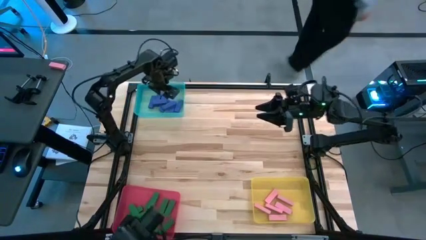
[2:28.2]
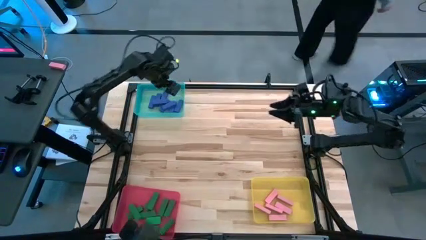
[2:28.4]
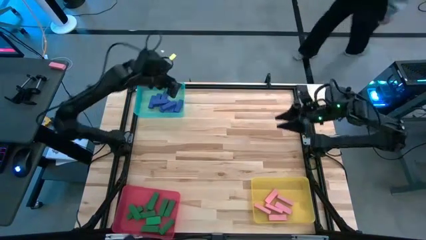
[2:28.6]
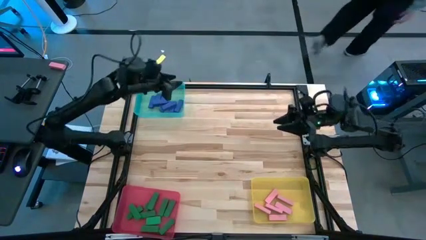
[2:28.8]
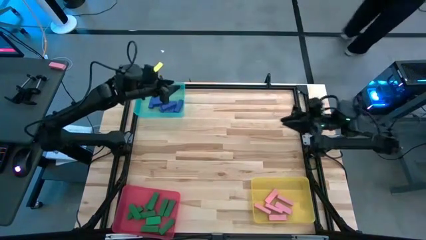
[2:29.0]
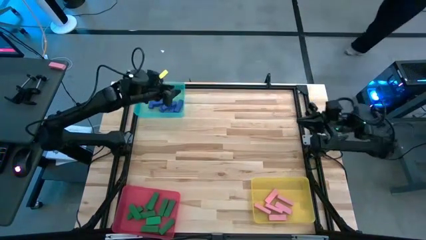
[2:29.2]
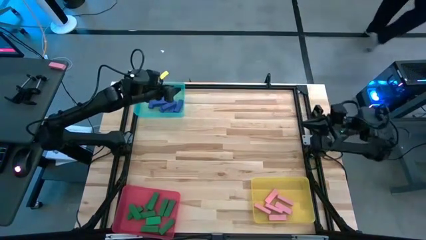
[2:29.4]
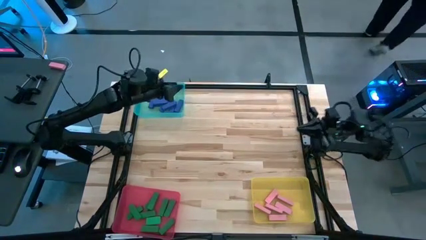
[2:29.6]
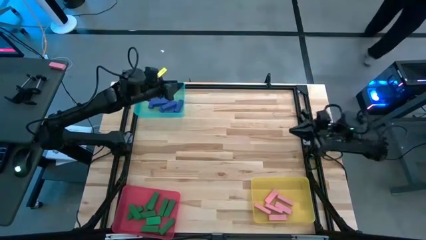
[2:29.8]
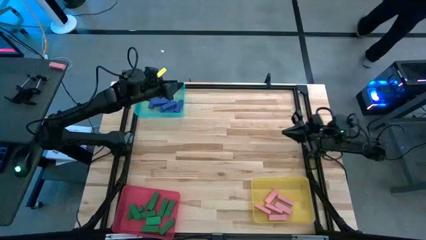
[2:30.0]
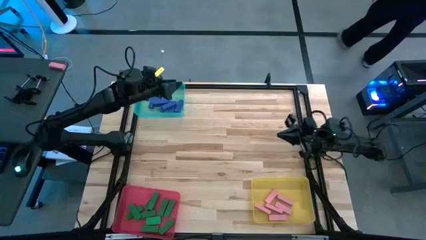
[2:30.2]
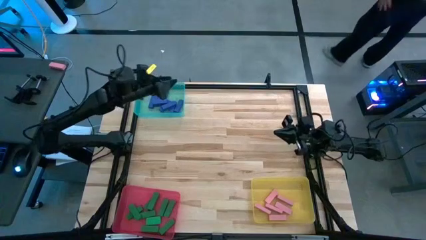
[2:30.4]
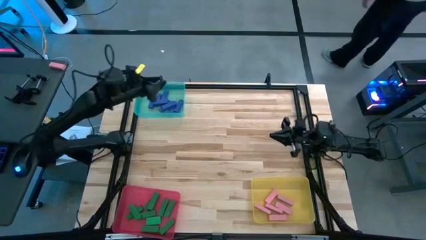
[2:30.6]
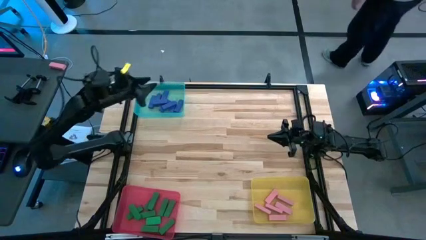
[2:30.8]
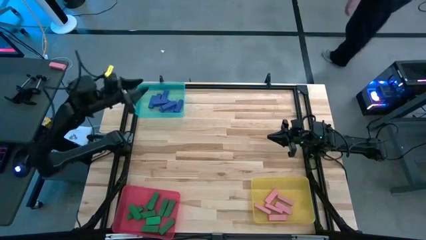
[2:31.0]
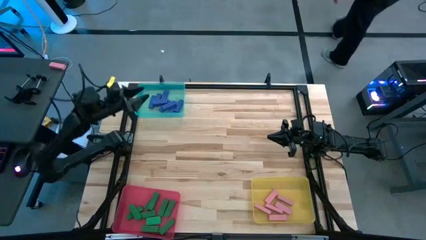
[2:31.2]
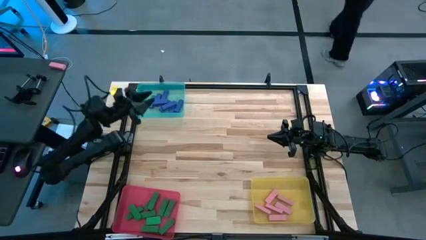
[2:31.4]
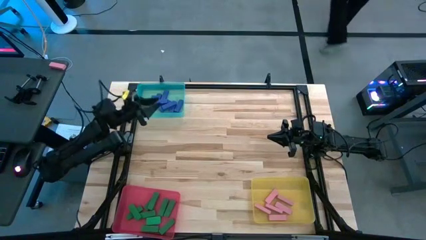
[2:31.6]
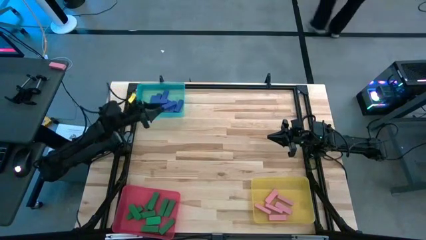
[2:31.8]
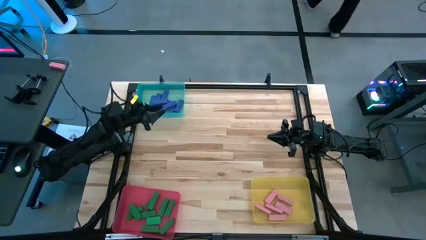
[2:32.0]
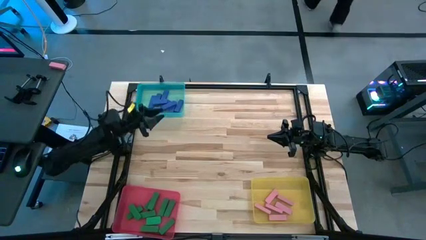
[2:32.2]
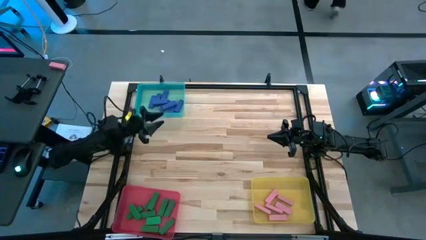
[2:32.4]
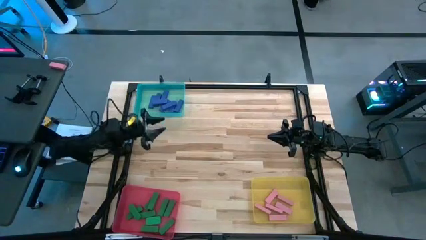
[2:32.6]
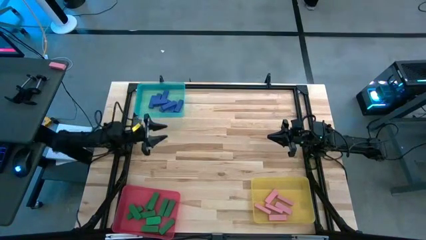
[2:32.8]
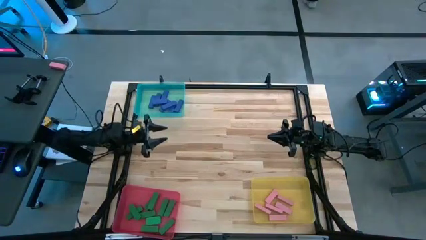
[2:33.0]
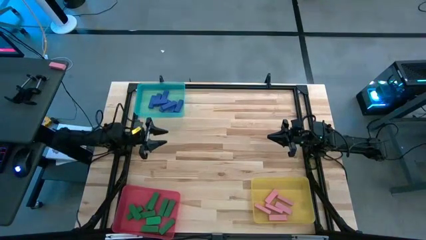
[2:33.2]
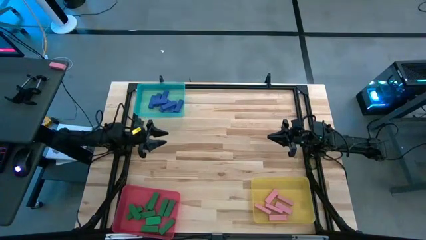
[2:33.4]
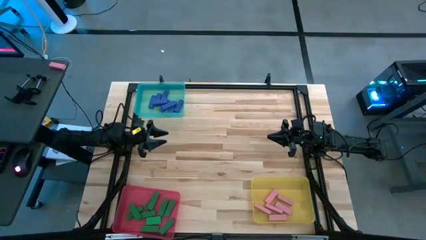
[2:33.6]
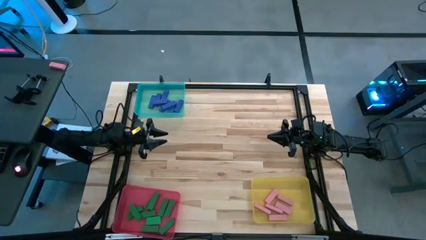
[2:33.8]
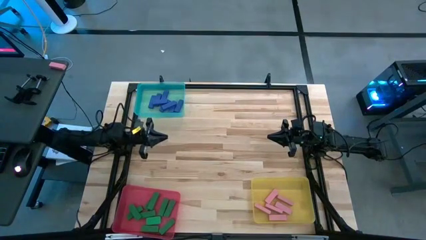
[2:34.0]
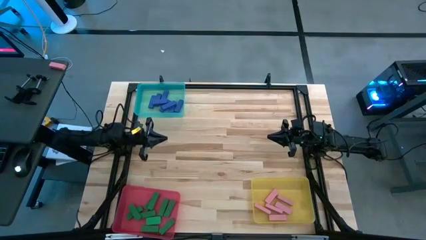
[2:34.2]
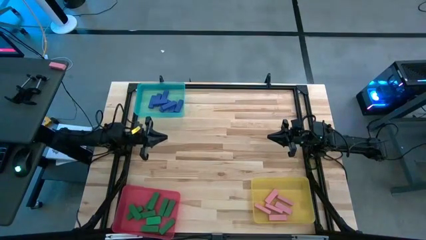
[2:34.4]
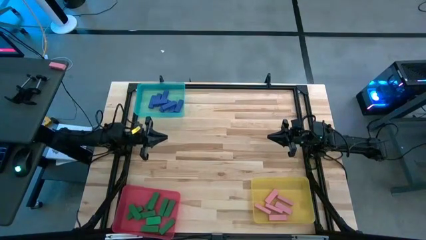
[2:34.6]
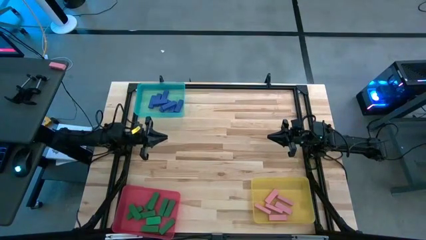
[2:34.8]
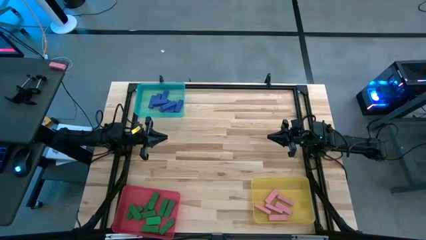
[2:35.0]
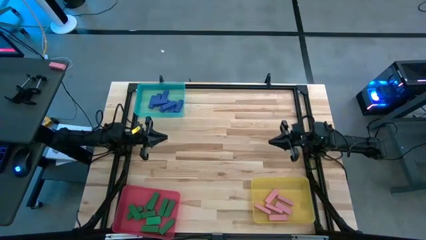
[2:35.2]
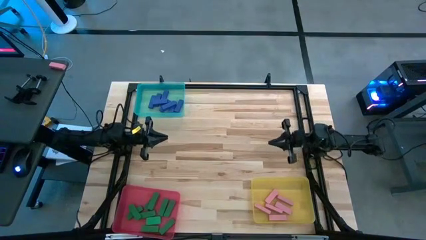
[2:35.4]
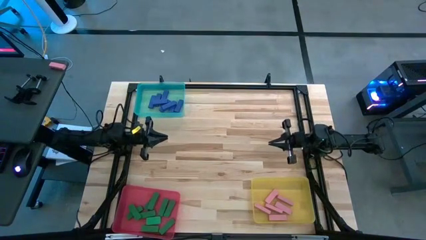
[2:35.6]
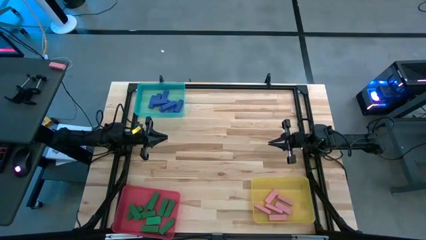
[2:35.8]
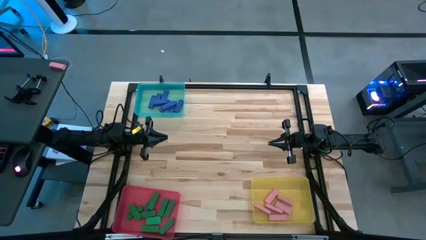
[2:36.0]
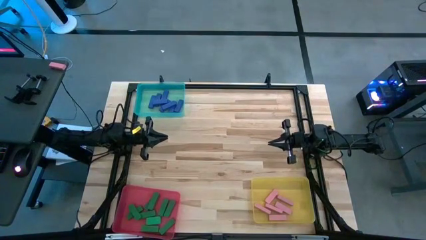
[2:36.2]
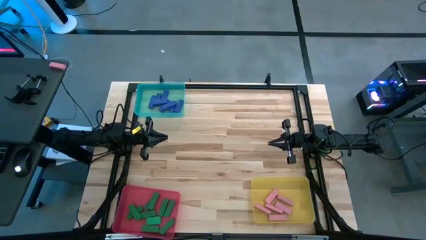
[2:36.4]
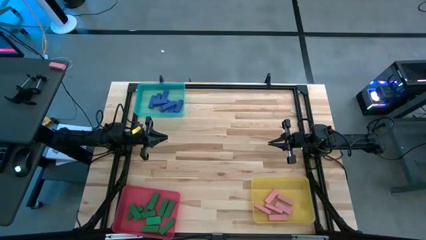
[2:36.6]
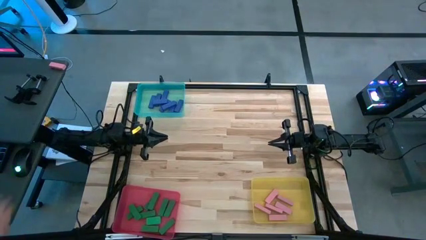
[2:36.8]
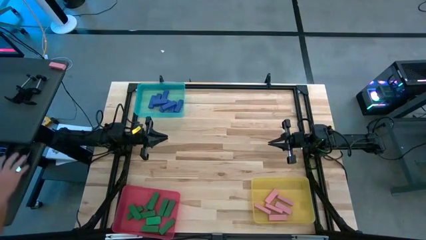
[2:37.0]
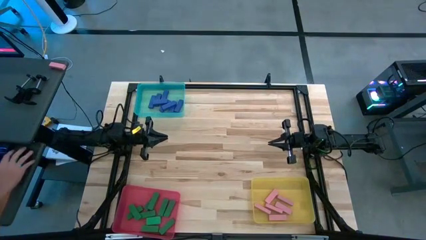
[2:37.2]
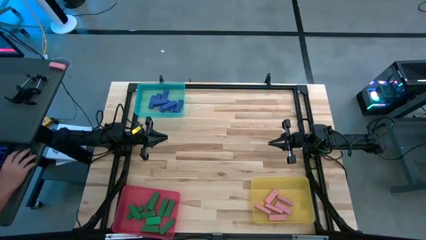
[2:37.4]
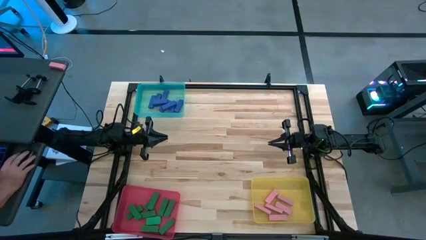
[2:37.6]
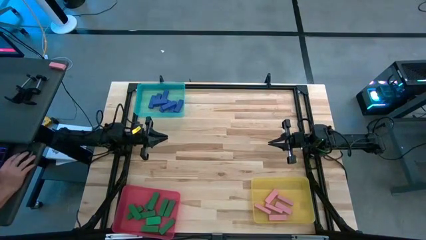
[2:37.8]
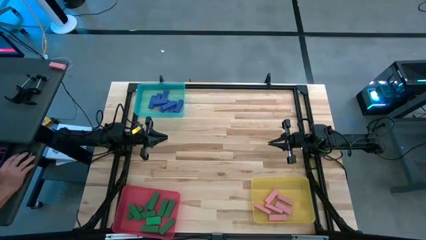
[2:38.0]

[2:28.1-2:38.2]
Task: Sort blocks
Return to Home Position

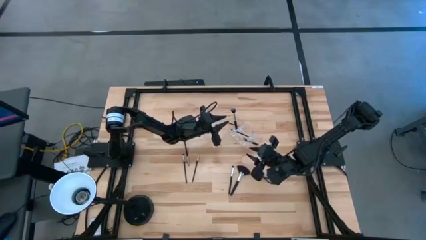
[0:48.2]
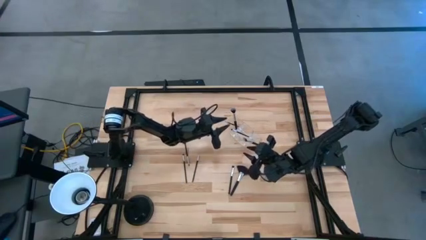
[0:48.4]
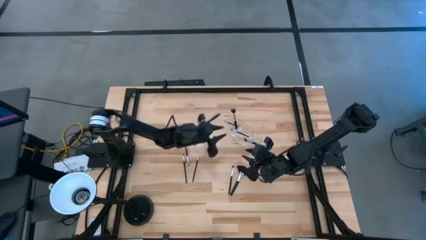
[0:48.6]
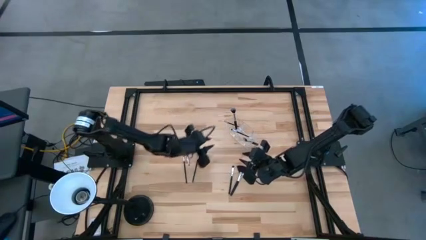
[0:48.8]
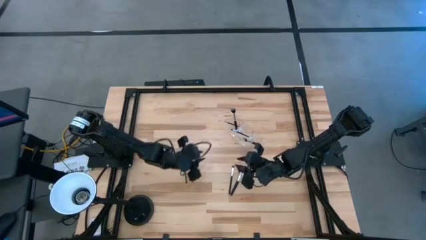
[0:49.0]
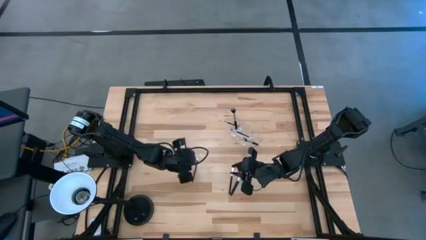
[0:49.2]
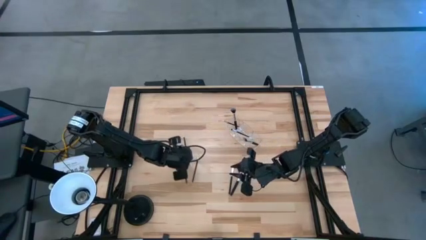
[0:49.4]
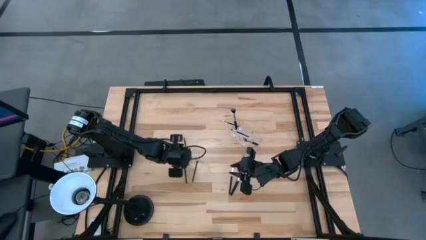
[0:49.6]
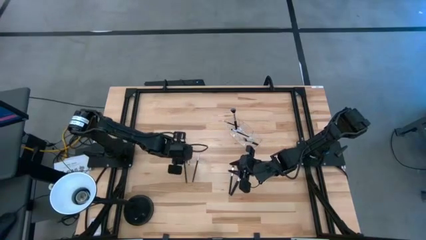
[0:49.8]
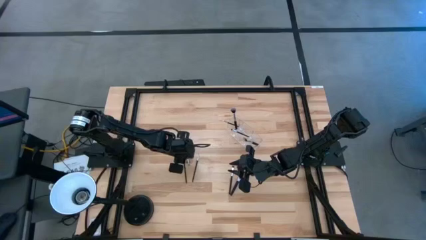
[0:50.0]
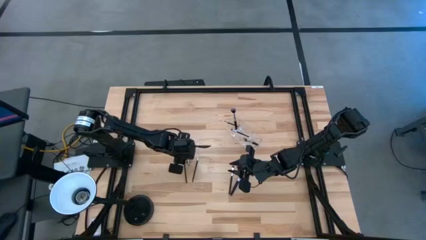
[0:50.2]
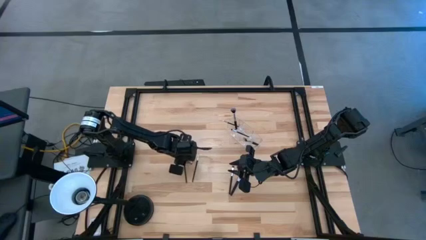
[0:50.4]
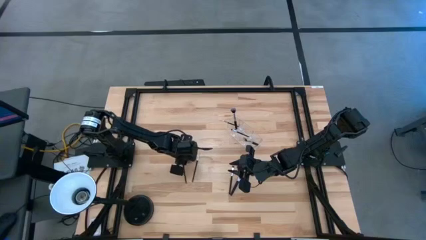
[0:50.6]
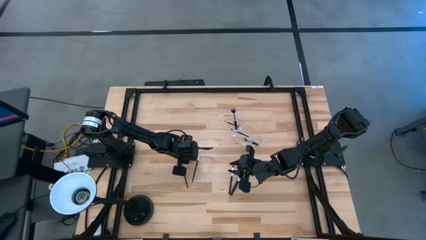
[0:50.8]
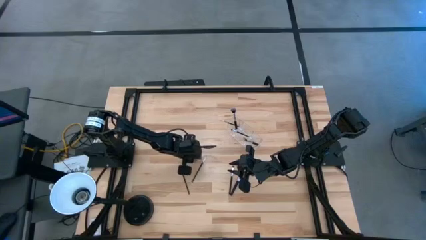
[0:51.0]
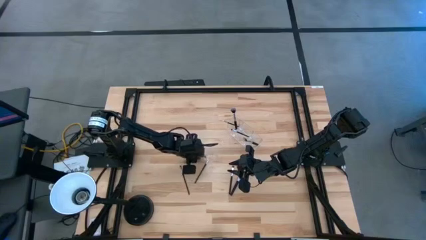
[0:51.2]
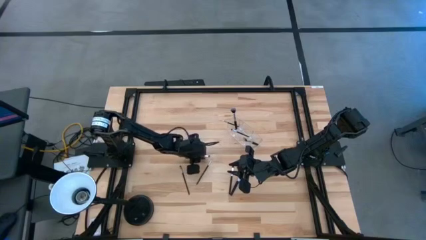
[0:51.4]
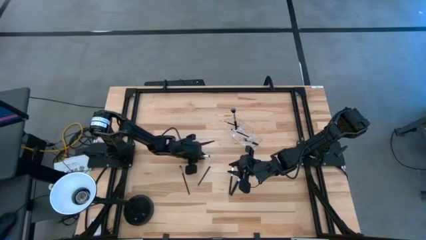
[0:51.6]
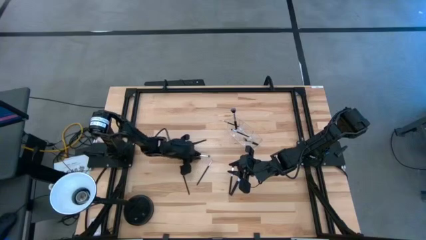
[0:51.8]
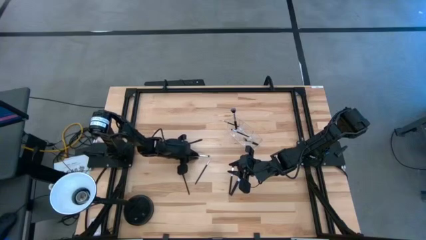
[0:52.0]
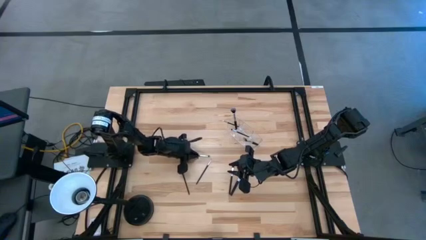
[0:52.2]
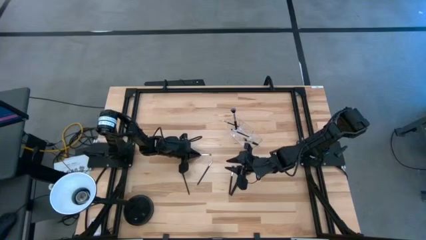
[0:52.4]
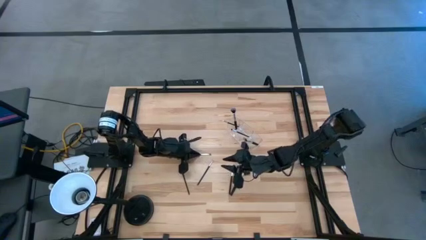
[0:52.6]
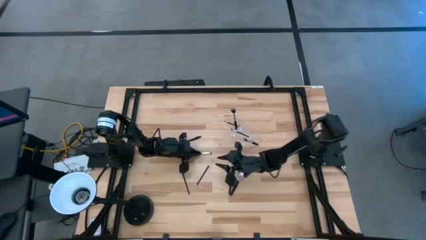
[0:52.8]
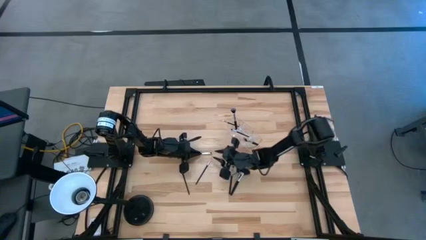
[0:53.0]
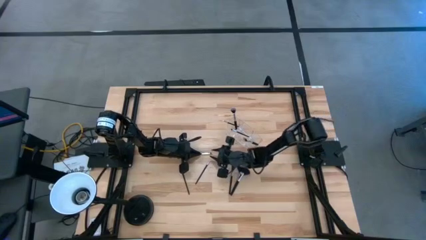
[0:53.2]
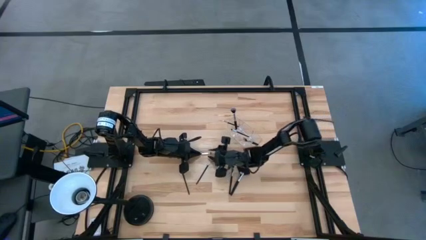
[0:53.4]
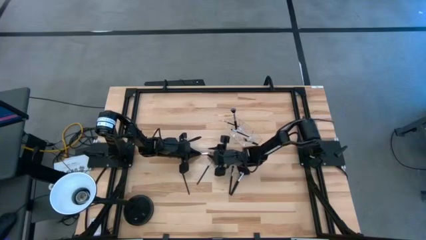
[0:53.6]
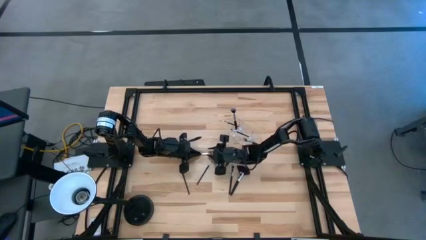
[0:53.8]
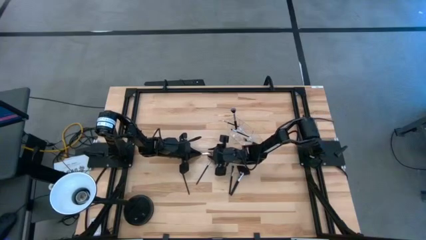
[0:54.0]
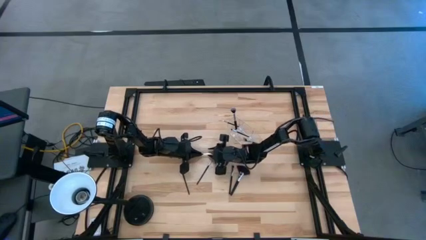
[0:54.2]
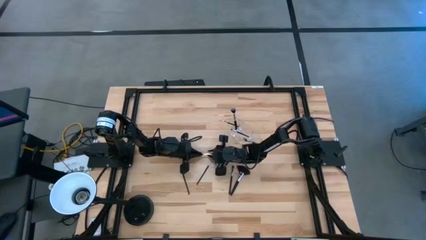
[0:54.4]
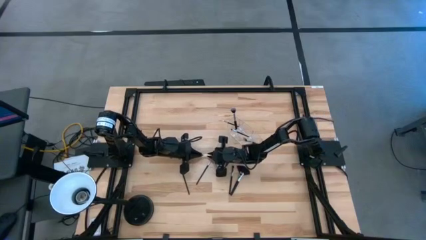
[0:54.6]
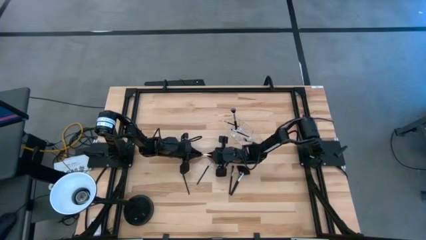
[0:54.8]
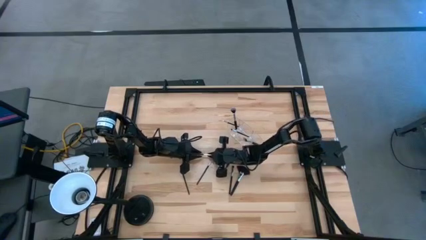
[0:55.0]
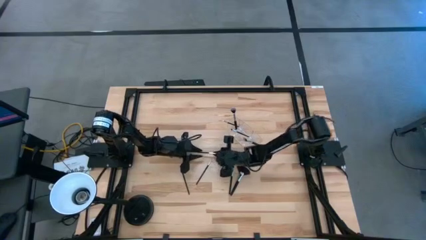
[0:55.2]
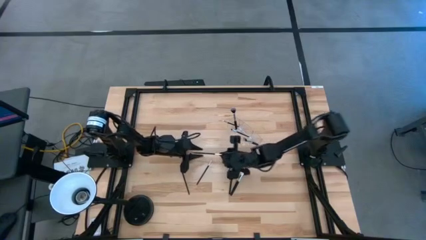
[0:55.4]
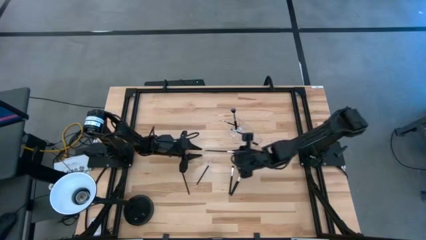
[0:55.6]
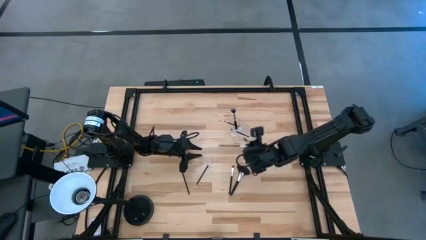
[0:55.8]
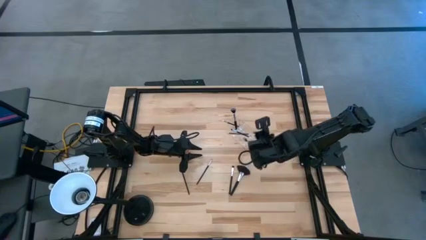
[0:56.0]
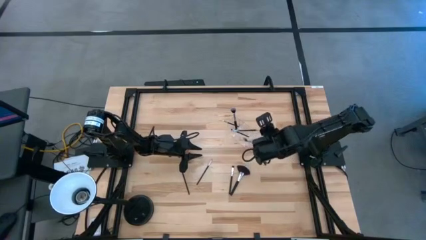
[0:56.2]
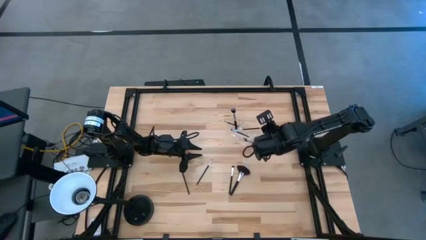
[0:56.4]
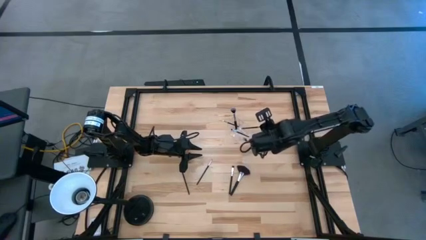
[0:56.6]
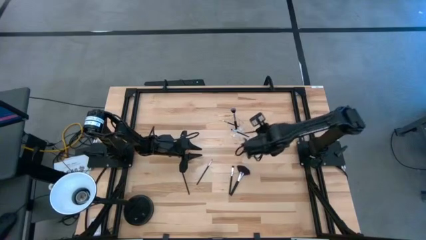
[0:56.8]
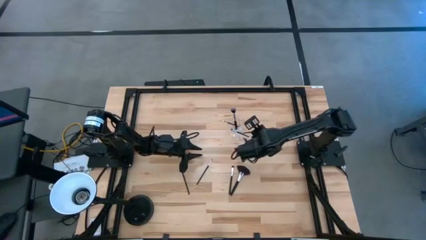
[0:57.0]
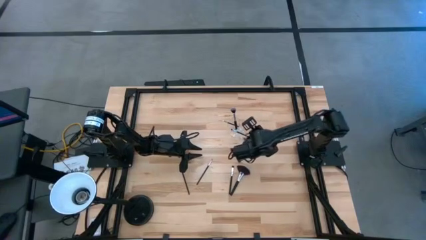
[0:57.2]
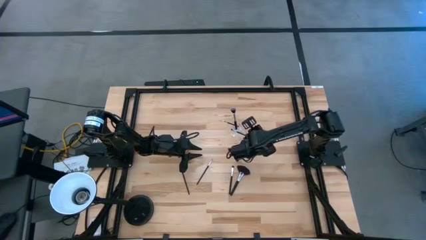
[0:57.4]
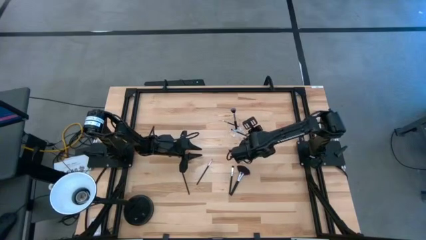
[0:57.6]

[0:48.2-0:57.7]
Task: Put items in baskets/containers
Put the eyeshadow brush into the transparent organizer
